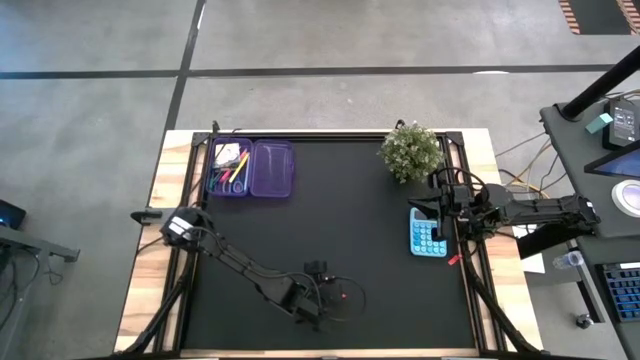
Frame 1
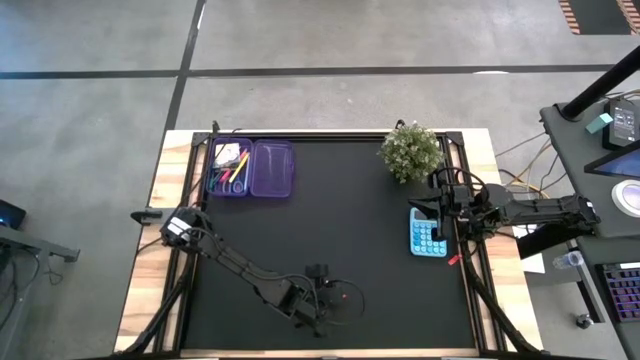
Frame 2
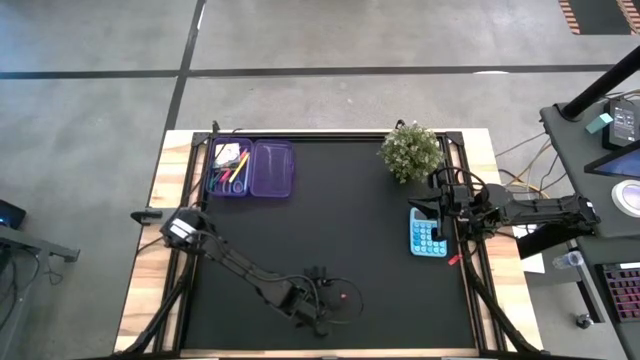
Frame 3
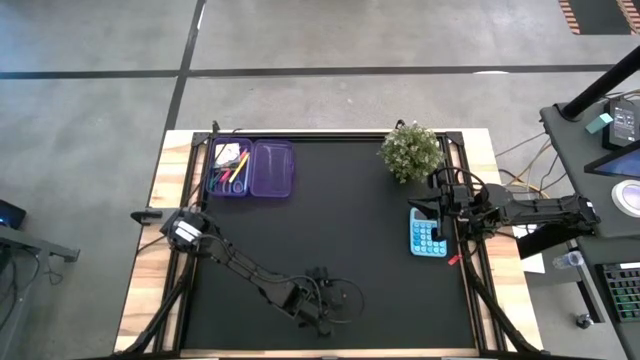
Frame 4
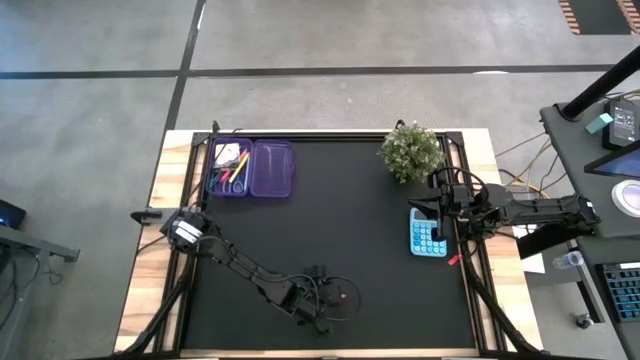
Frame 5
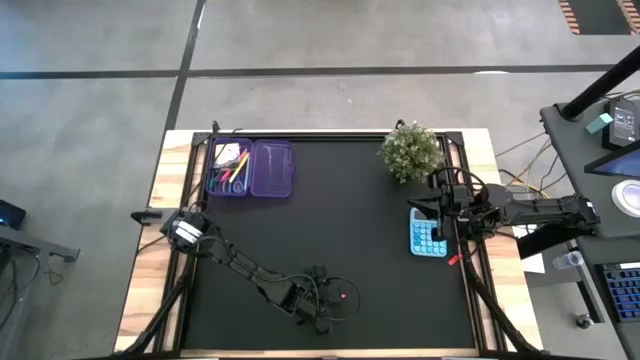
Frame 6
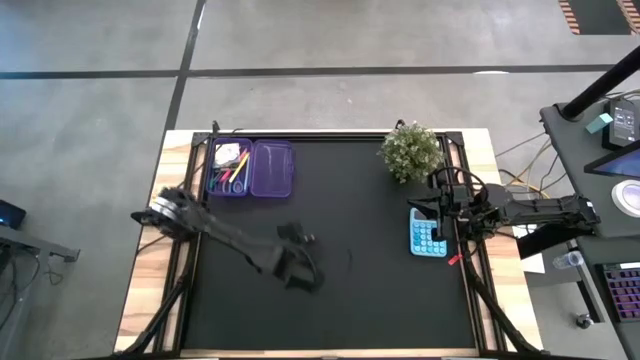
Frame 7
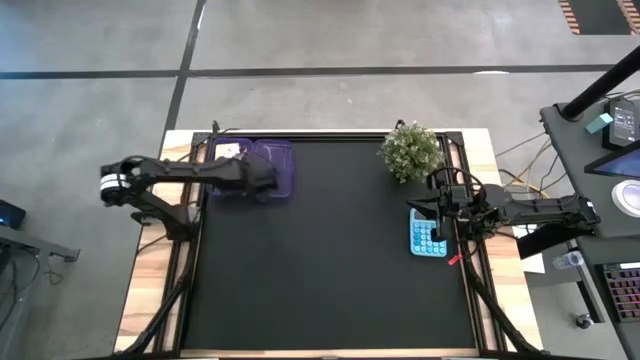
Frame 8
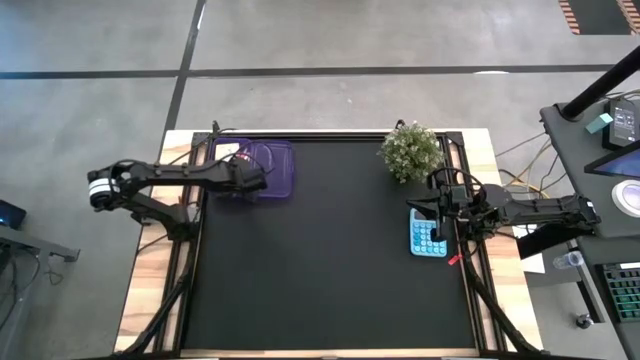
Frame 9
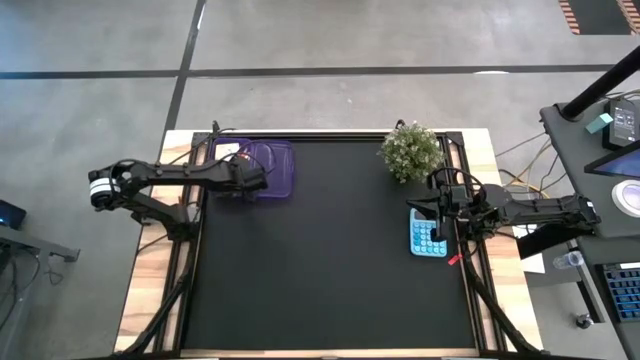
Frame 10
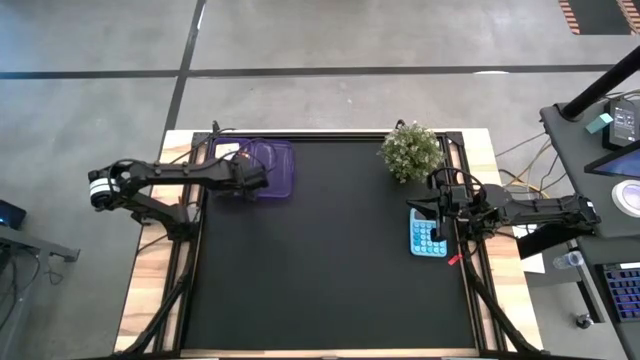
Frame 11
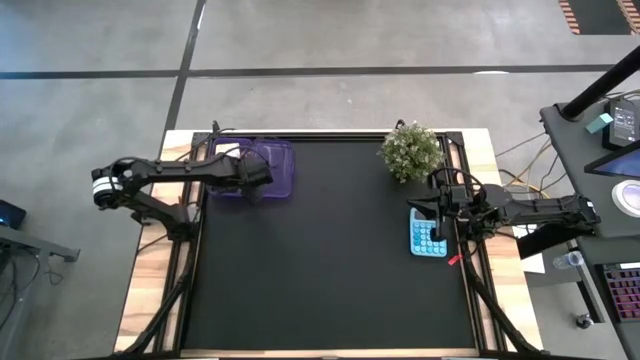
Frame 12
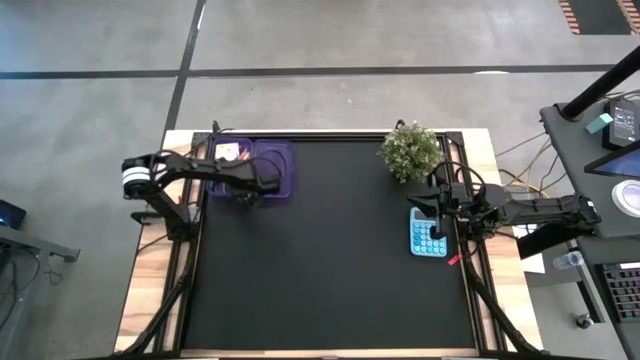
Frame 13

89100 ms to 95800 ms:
Task: Pack school essentials
Put the orange eraser into the purple supply box

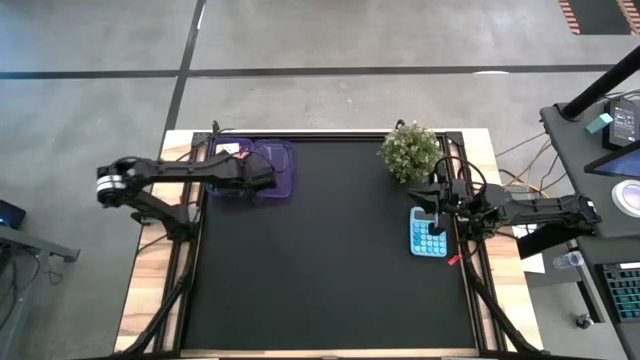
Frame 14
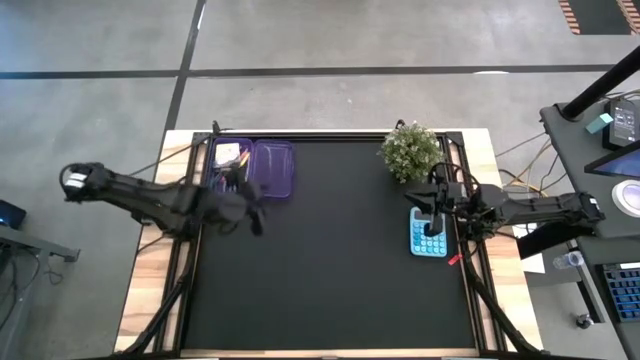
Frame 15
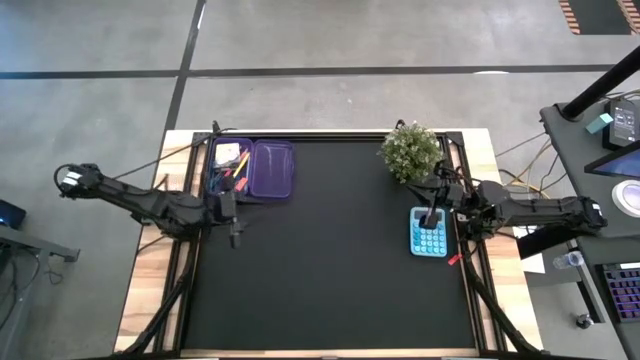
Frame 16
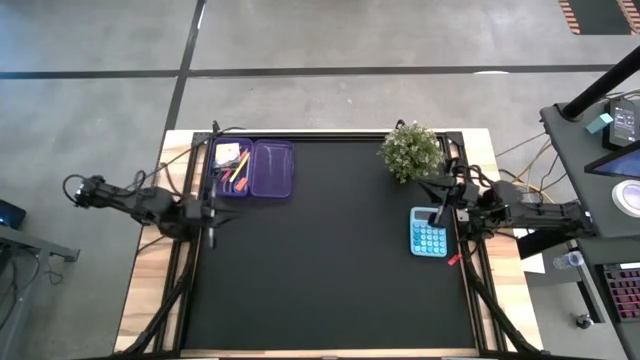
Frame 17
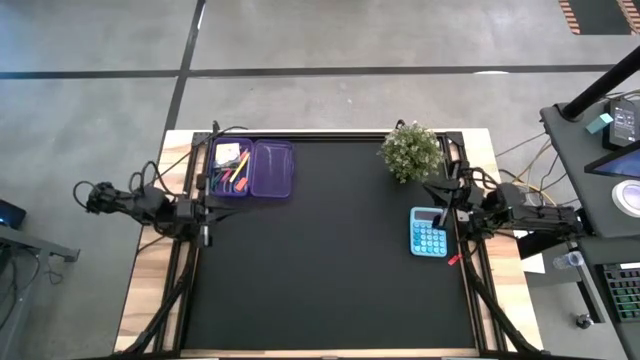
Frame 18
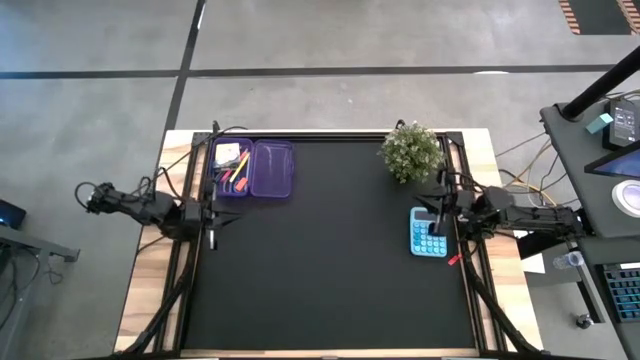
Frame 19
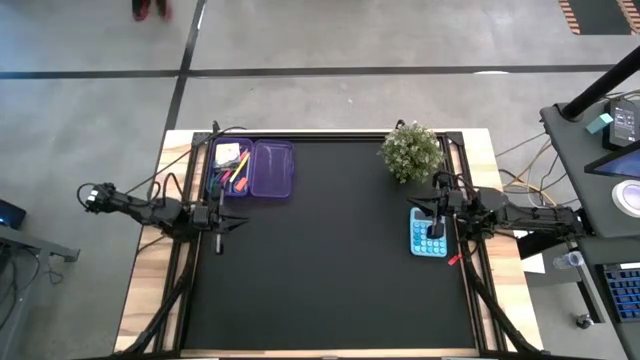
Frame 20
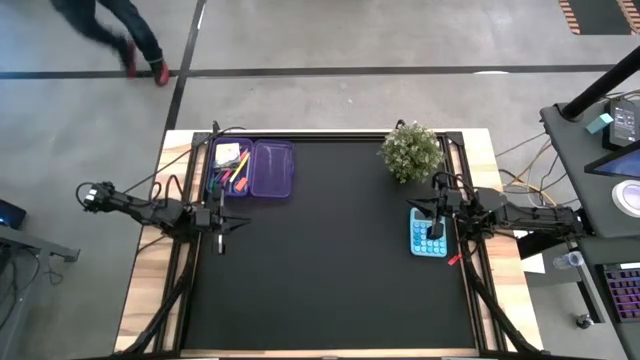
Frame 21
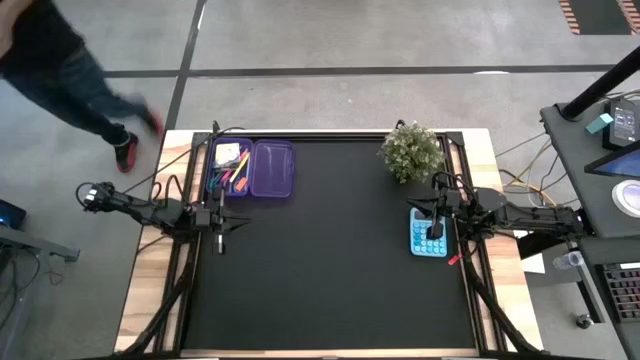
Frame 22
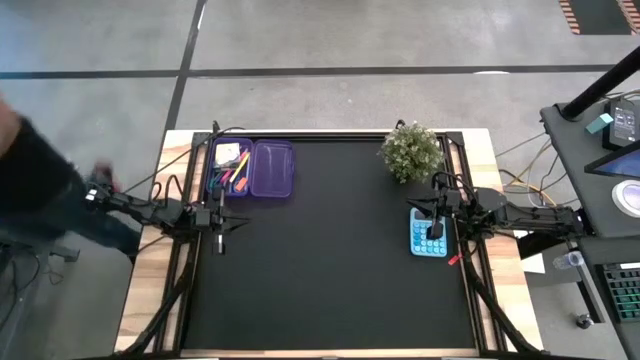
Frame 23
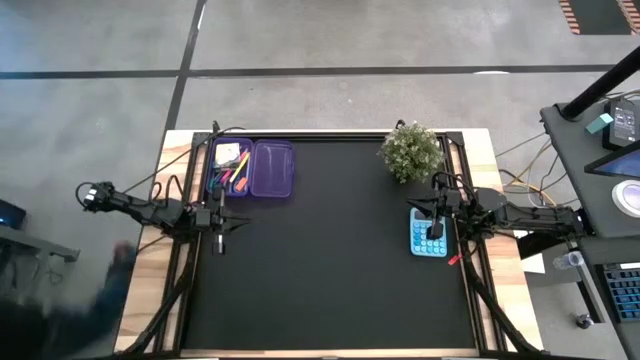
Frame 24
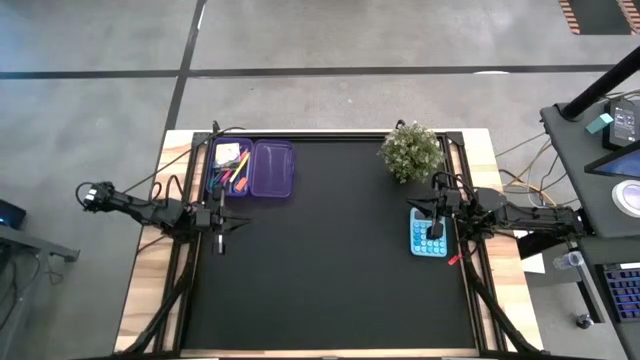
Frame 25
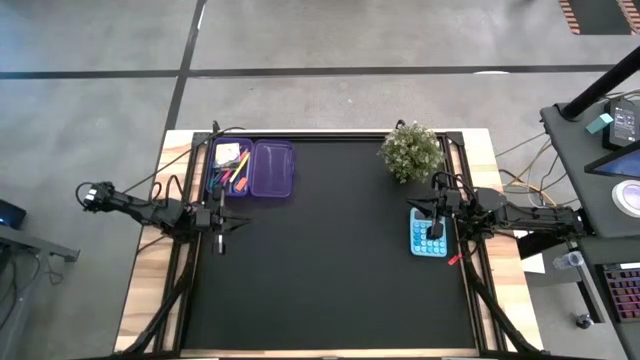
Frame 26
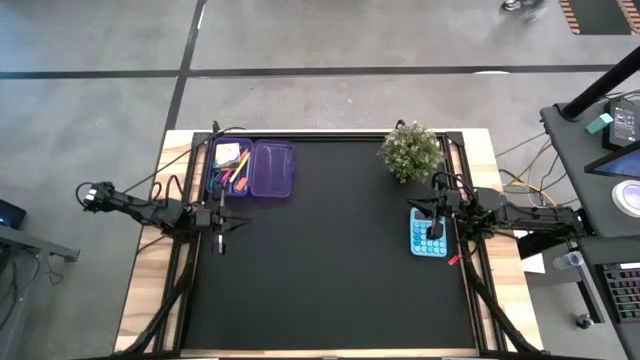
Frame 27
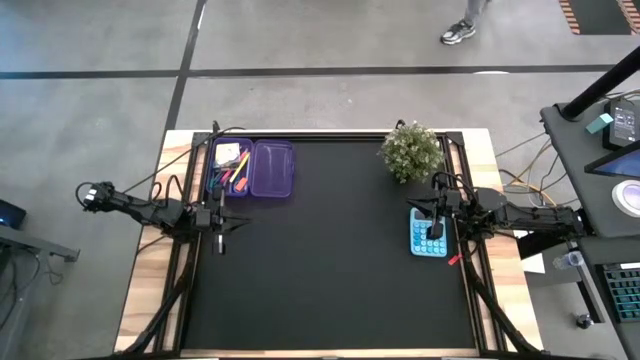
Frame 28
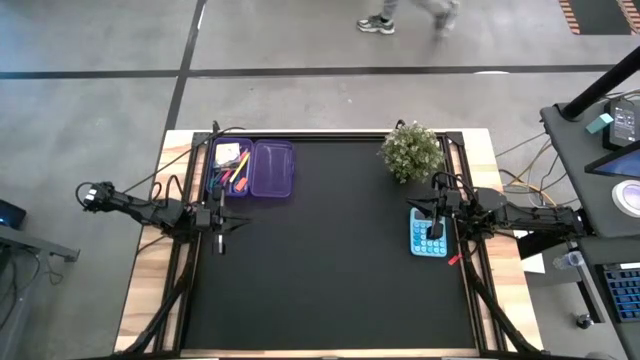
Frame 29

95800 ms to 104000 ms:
Return to Home Position

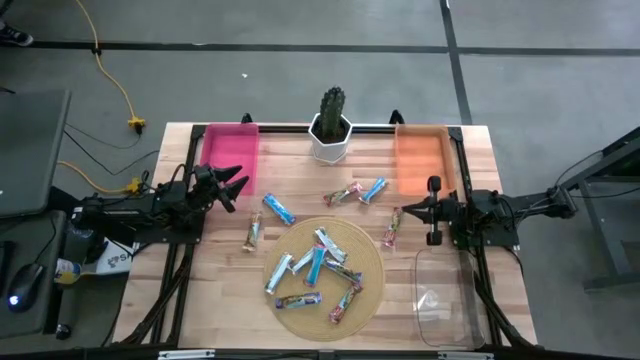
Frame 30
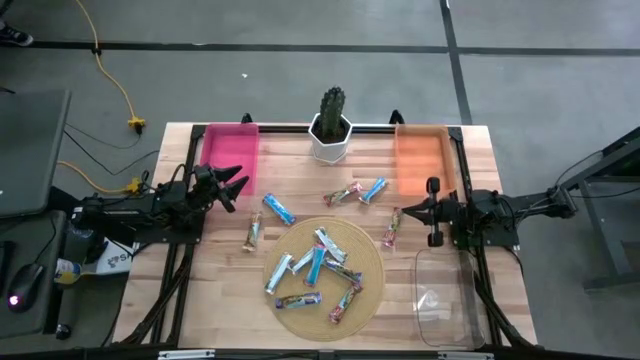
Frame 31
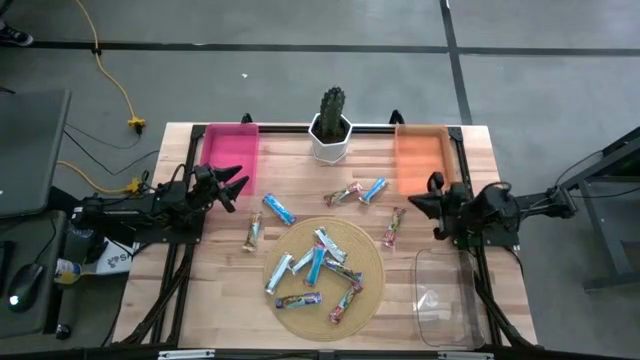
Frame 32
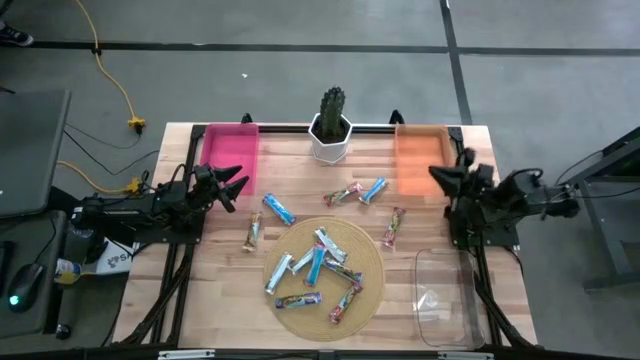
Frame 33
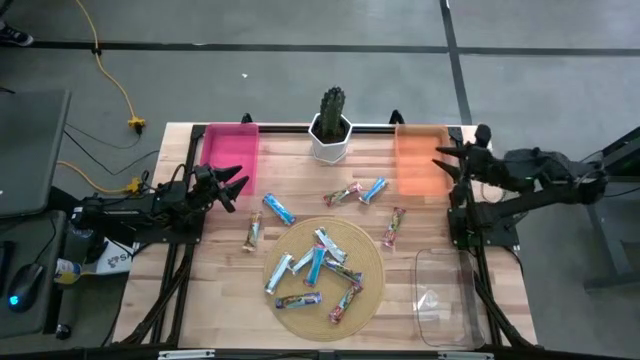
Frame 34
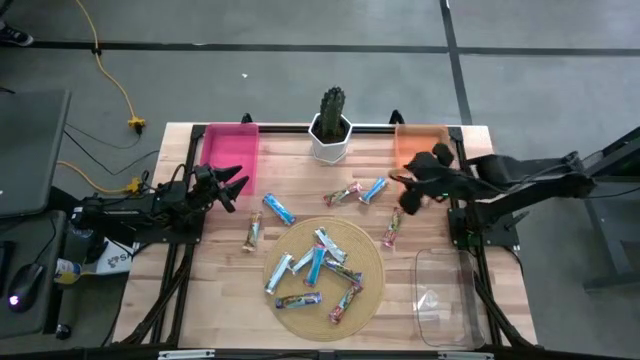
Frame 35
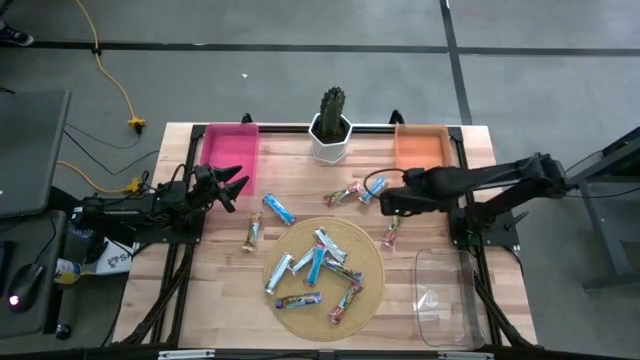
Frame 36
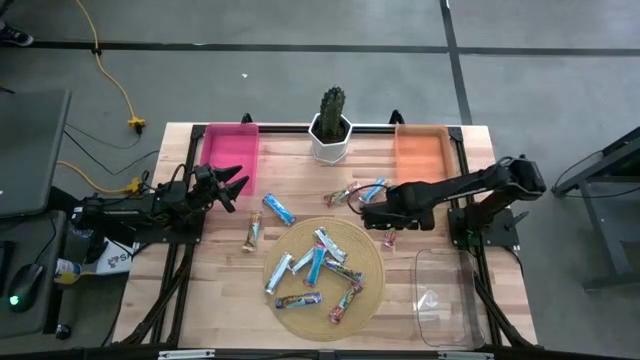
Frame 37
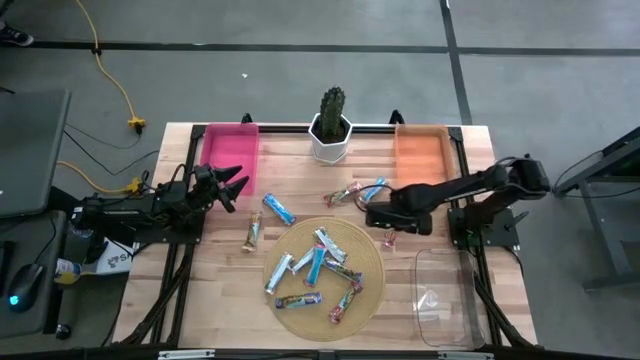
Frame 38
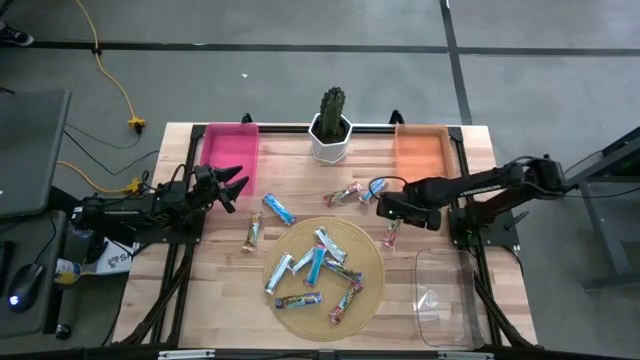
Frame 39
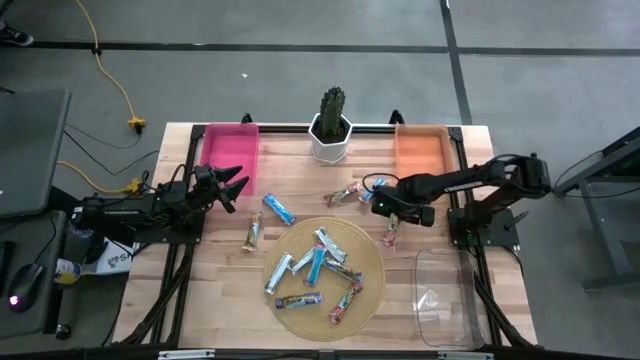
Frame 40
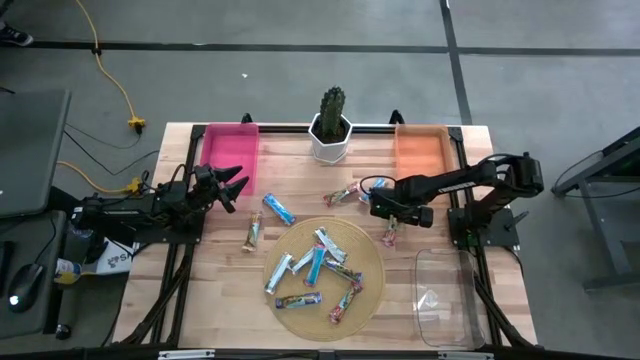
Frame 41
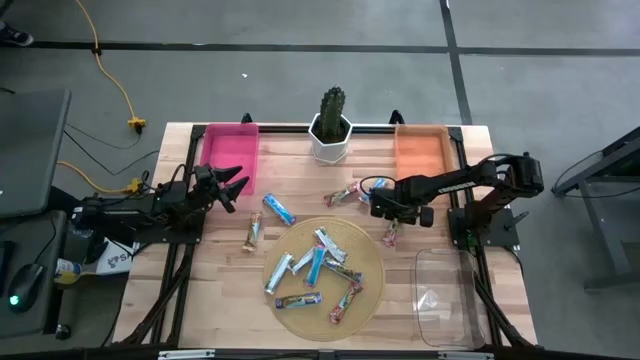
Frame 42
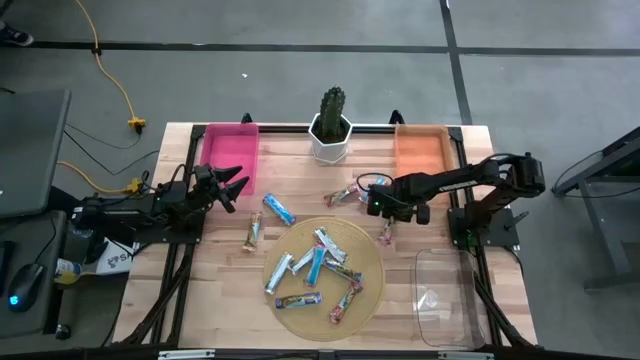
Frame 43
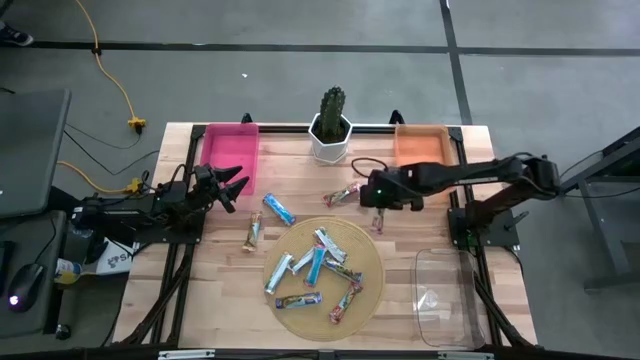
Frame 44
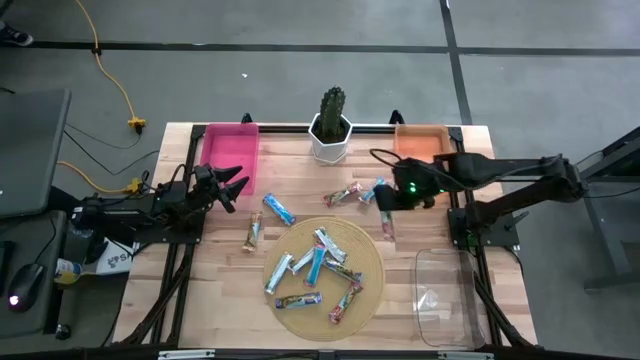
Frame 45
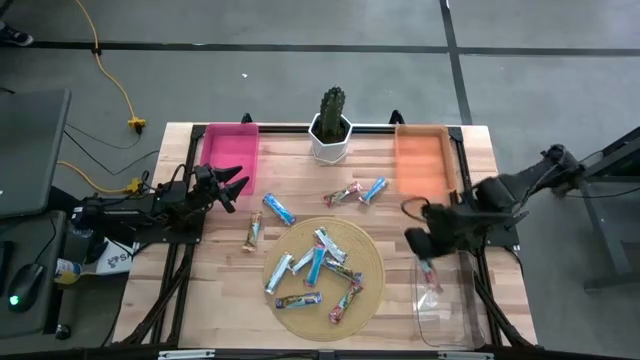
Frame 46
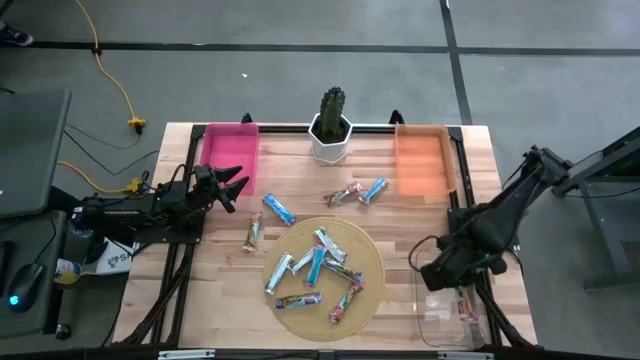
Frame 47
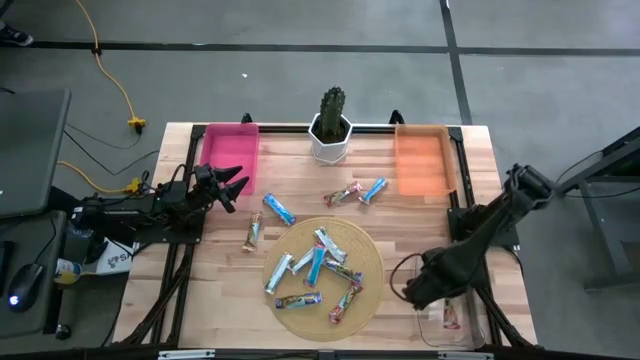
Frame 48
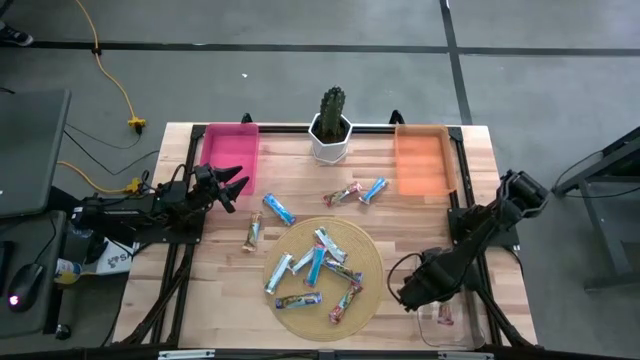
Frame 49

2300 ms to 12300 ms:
Task: Pick and place Granola Bars by type
Put the red granola bar into the transparent bin
